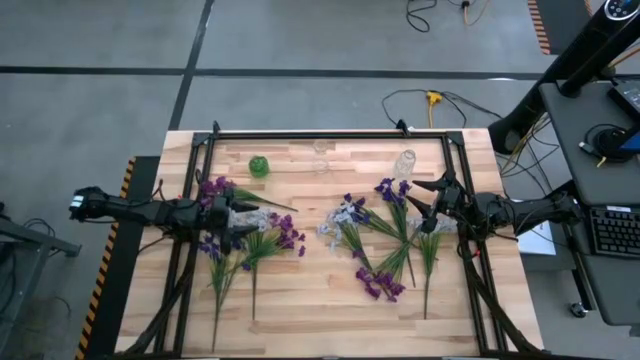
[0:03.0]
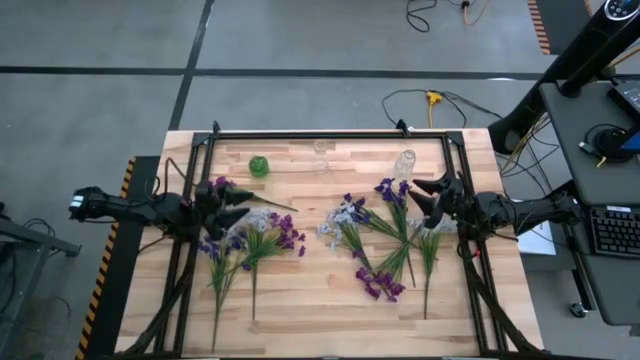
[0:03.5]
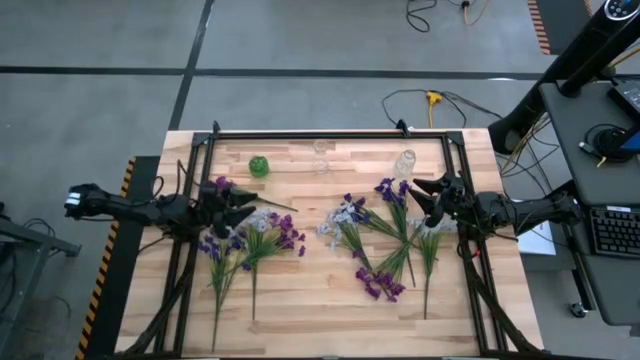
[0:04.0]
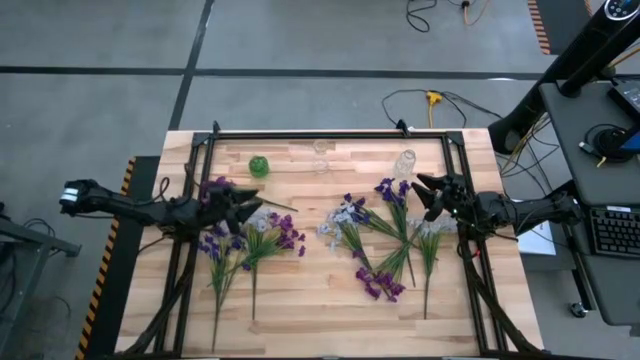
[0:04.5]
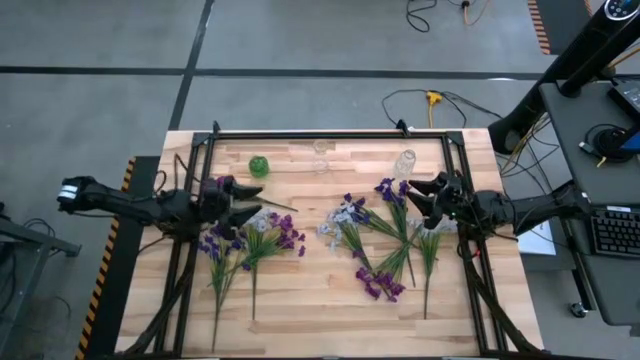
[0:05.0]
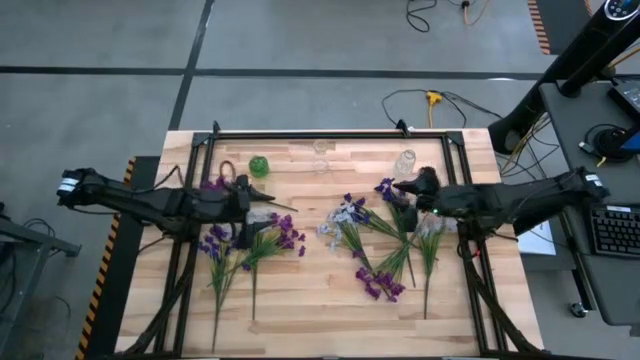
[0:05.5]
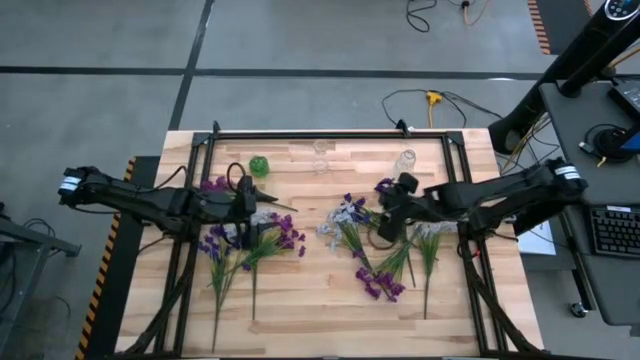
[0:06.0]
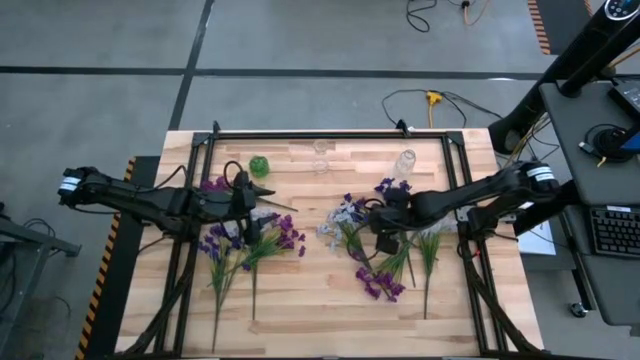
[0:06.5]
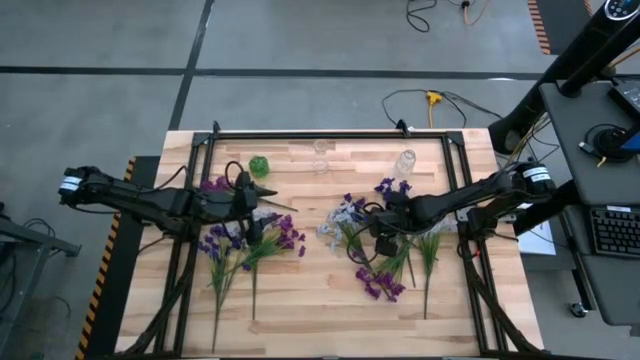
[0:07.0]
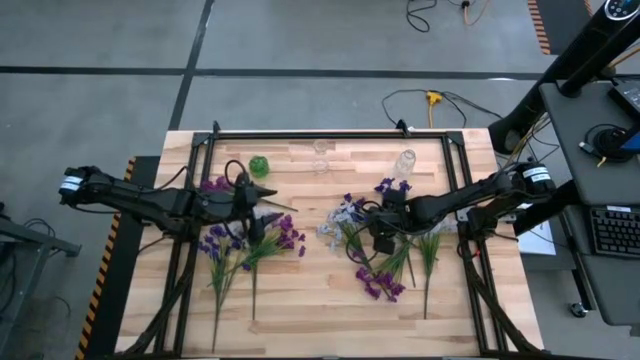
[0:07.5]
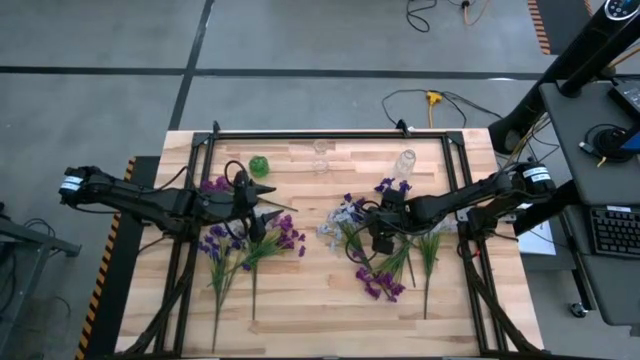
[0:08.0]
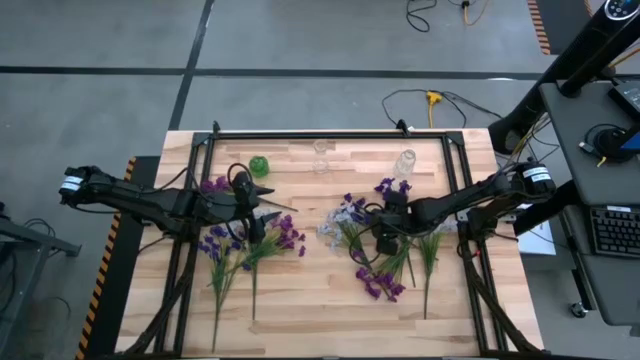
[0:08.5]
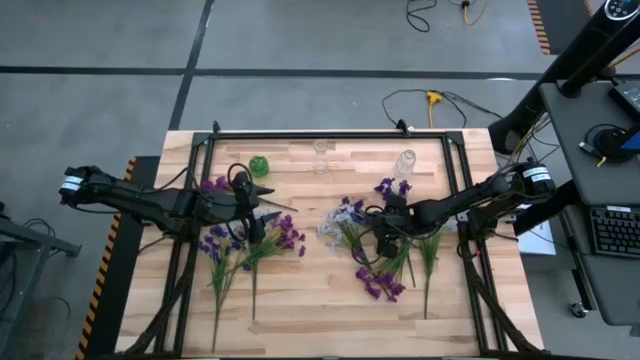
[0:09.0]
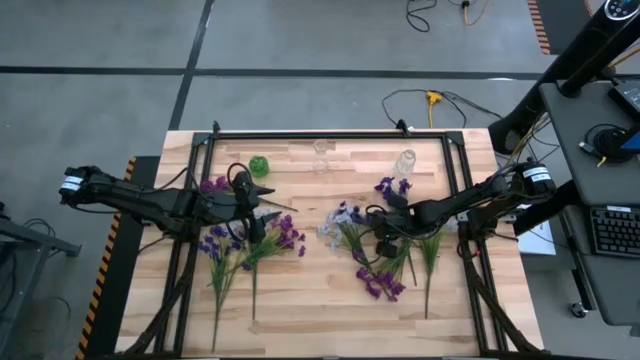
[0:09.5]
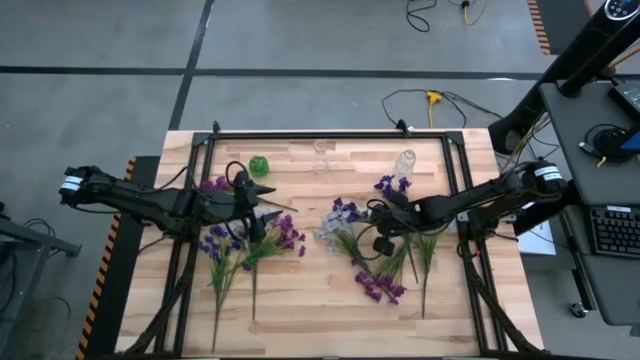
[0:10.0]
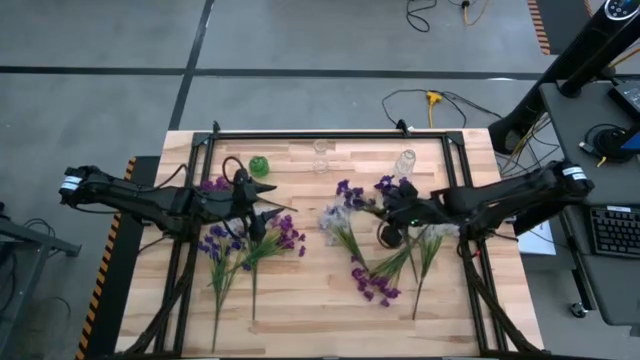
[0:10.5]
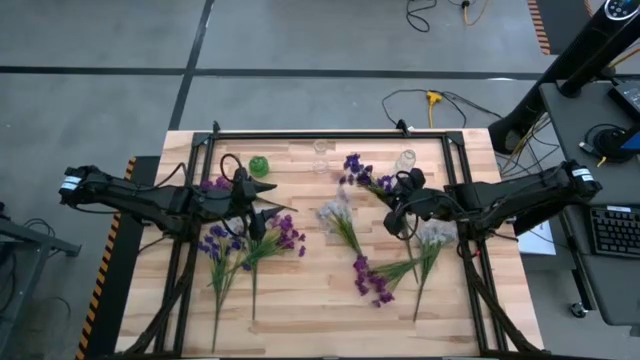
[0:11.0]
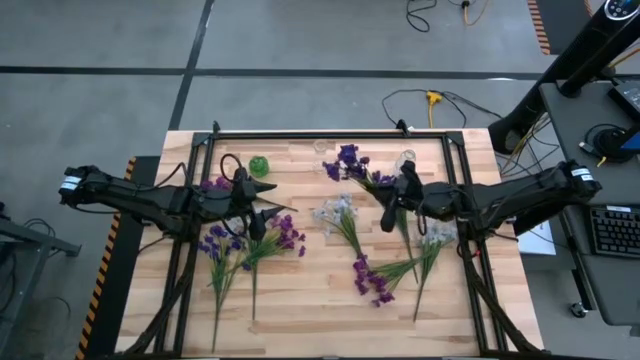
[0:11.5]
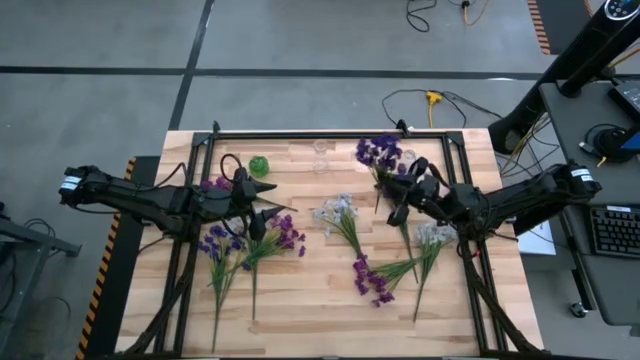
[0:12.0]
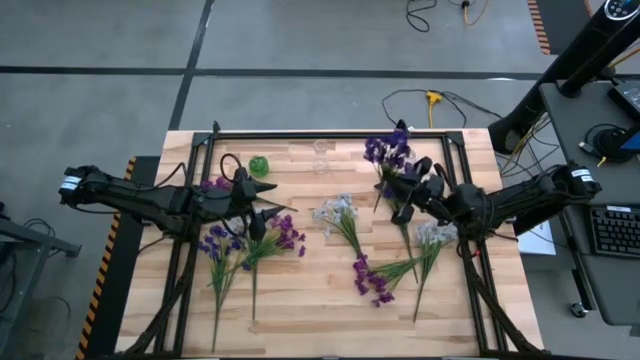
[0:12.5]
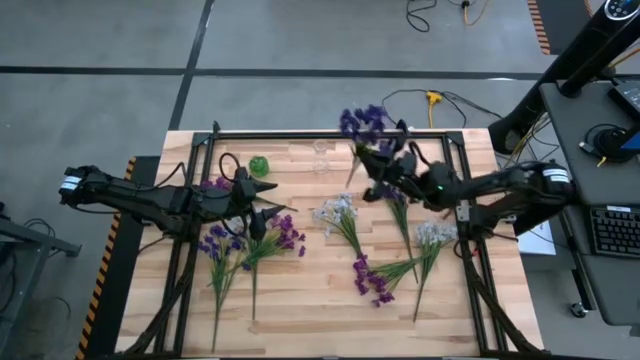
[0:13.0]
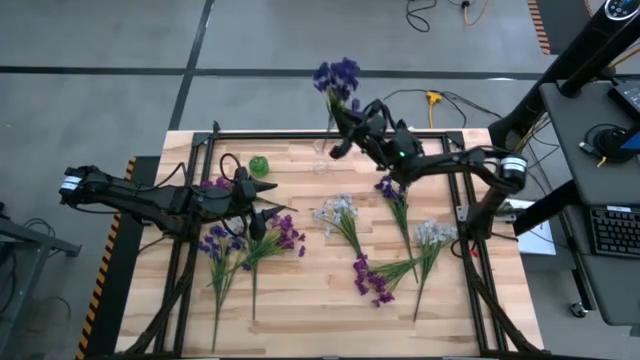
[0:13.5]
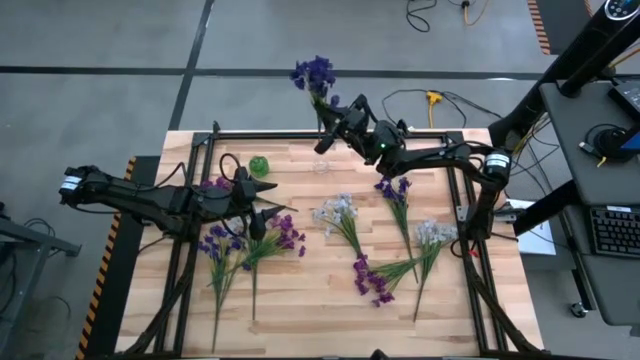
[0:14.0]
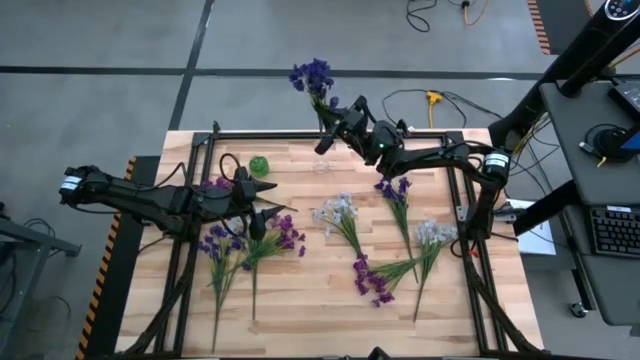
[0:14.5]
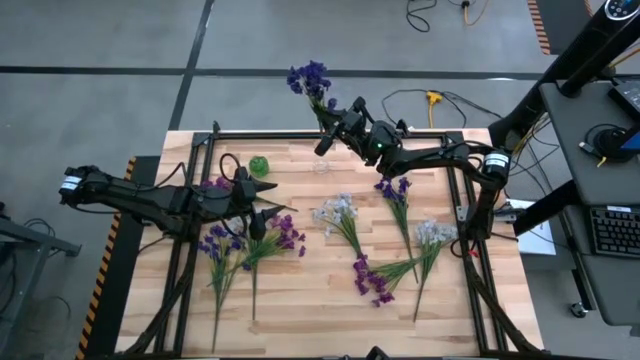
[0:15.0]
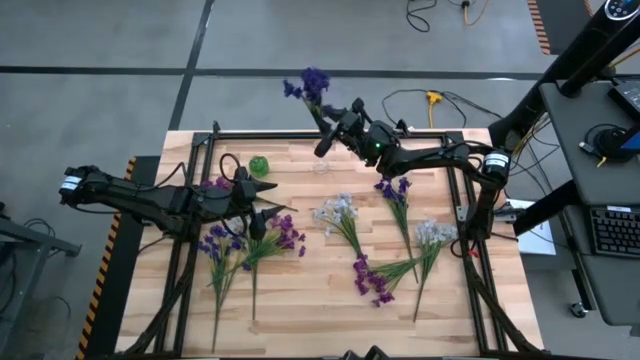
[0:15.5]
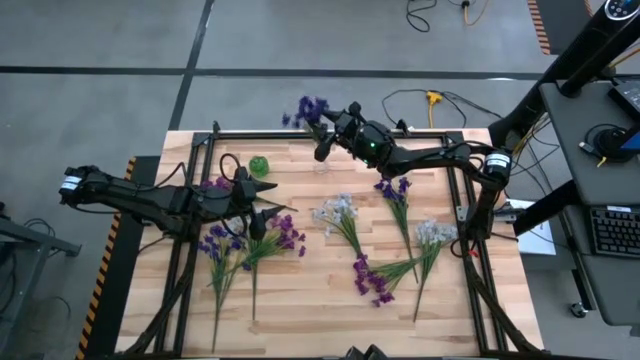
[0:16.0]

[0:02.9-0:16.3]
Task: Sort flowers into vase by color
Put the middle dark violet flowers into the left transparent vase

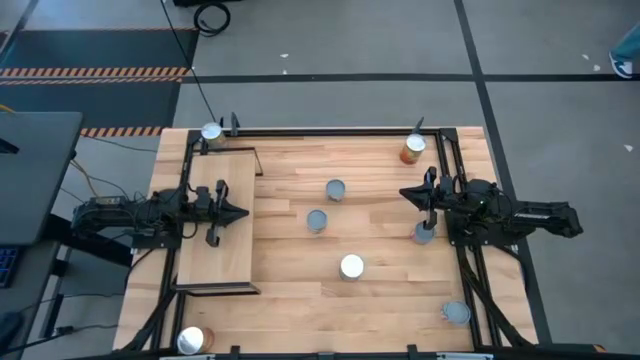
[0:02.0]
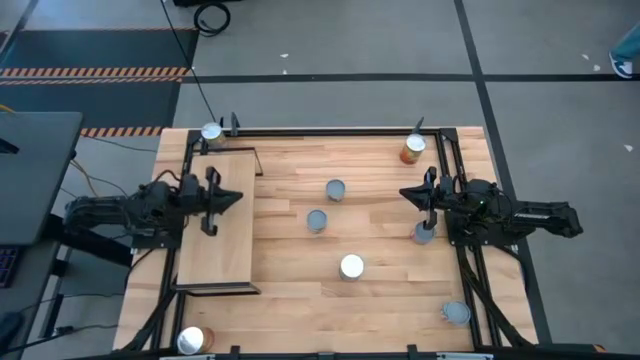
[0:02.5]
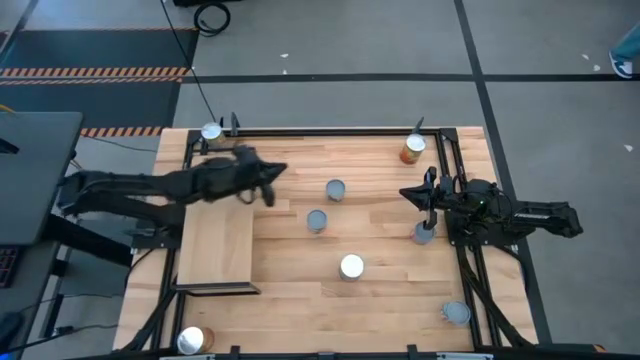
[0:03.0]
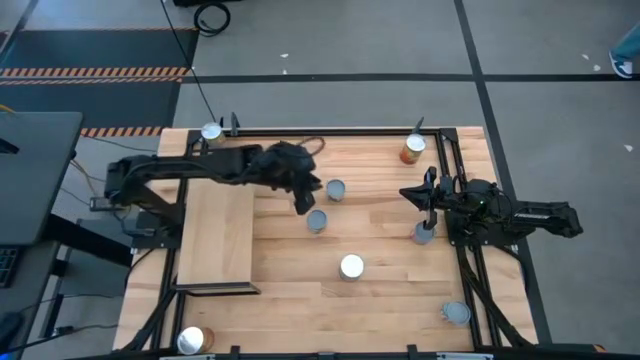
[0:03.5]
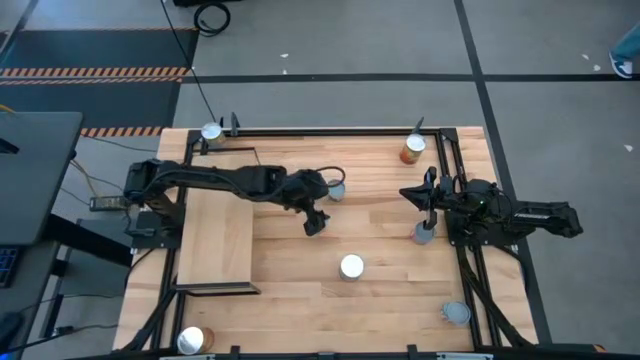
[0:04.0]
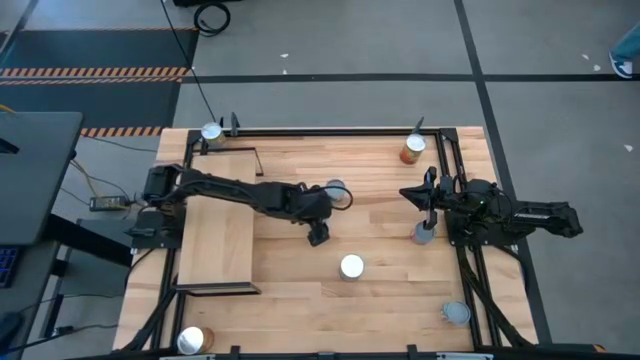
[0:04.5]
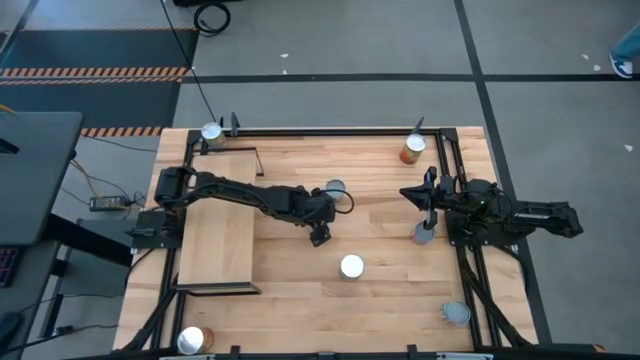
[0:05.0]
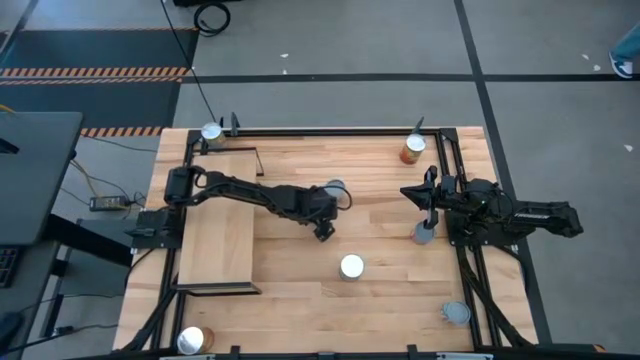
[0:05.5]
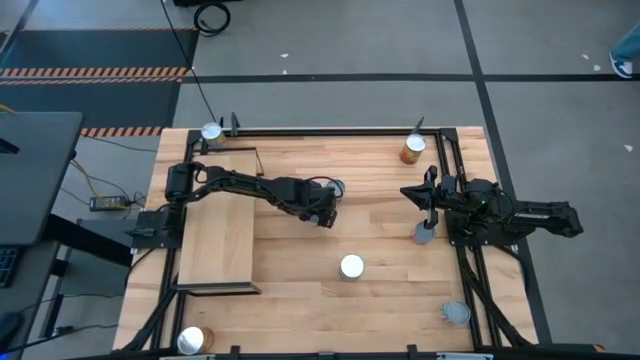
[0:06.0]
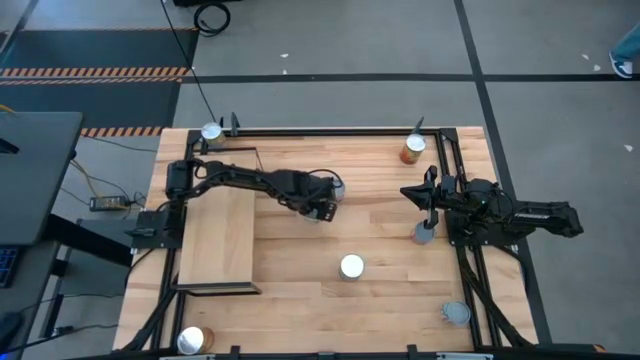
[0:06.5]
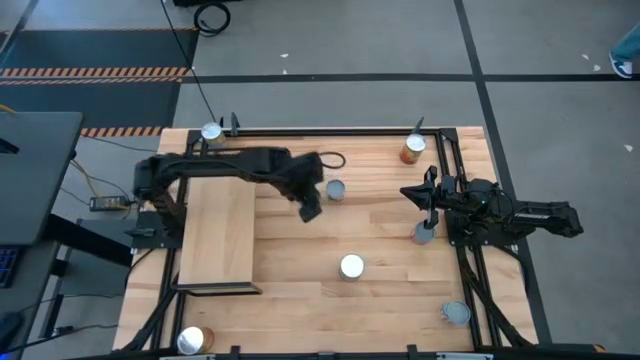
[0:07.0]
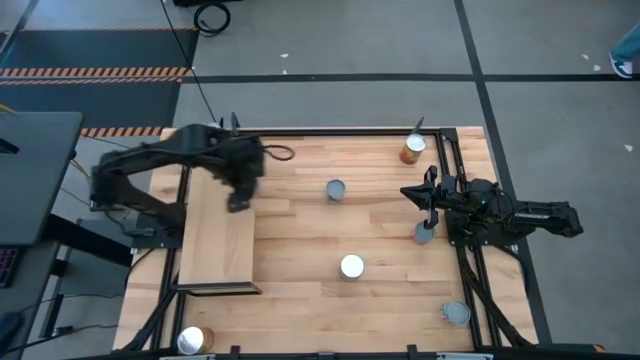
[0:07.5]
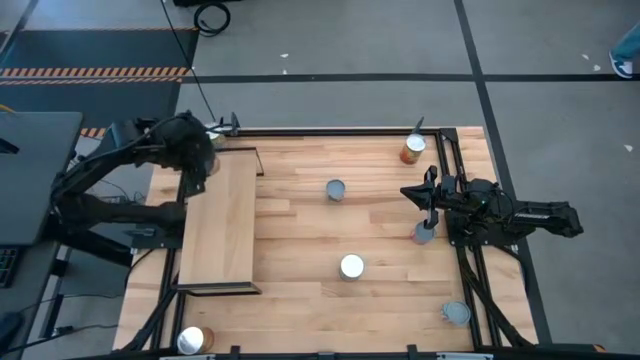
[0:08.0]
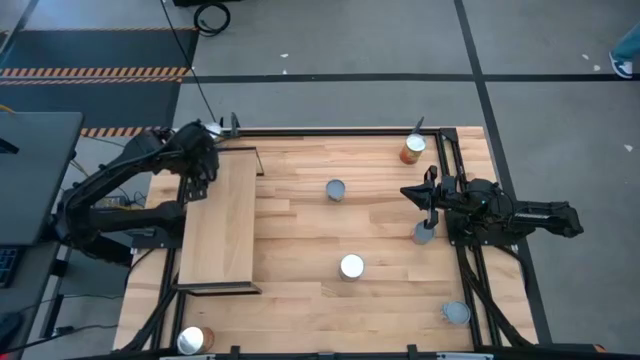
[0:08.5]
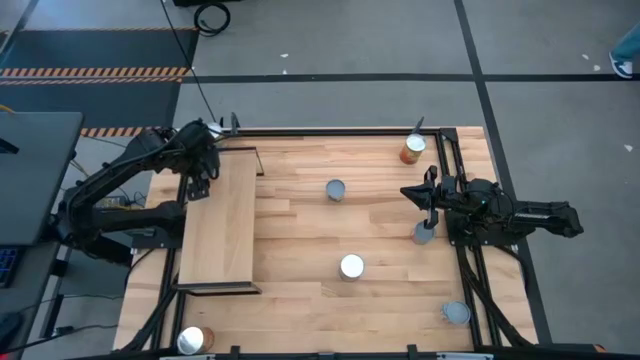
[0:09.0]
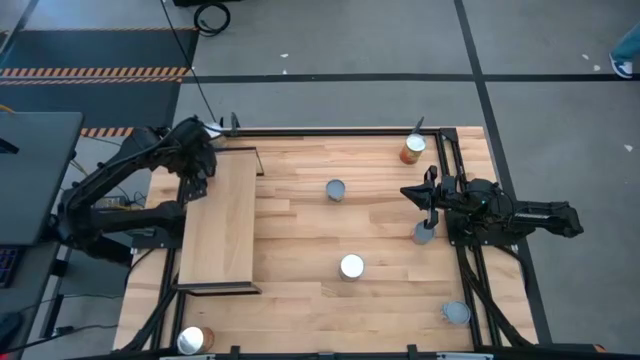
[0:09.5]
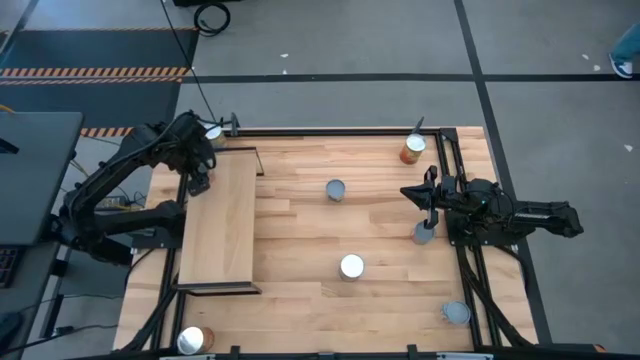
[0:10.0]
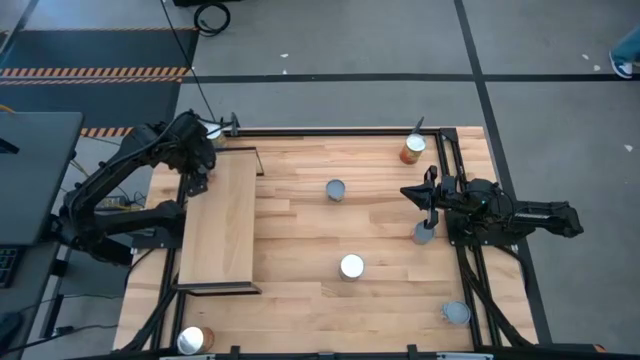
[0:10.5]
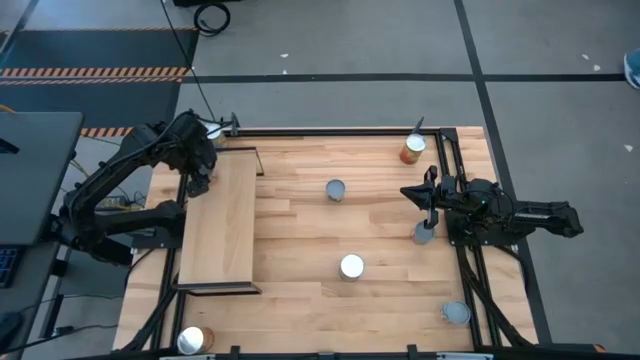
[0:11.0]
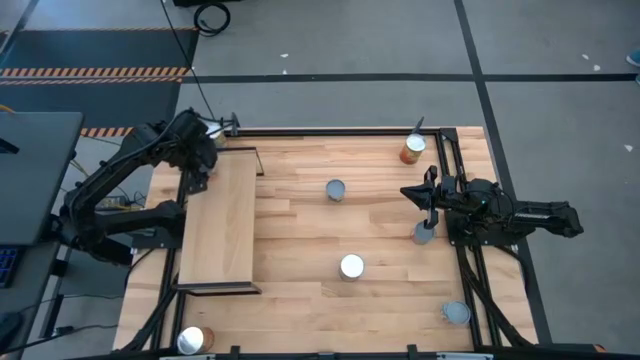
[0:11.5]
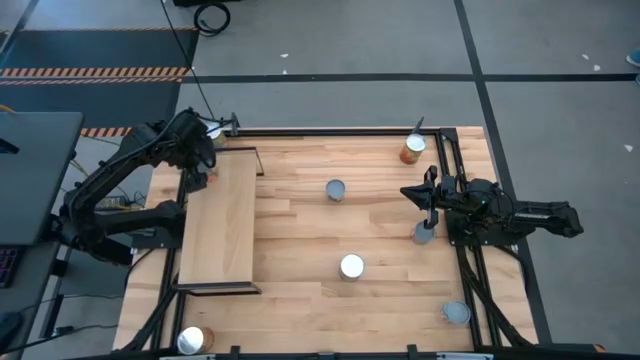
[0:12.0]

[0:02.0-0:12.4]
Task: Pick and place cans onto a shelf
Put the canned orange on the shelf
